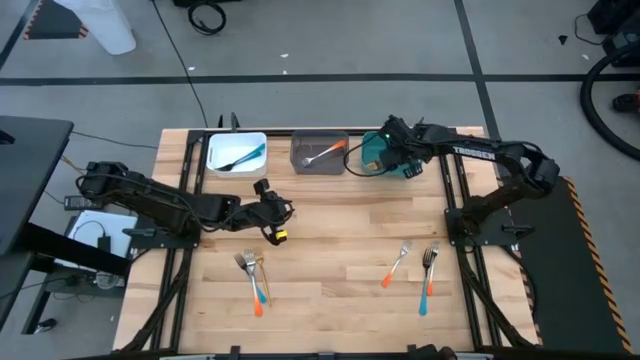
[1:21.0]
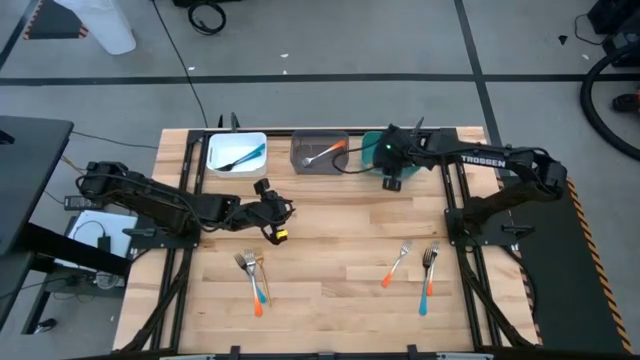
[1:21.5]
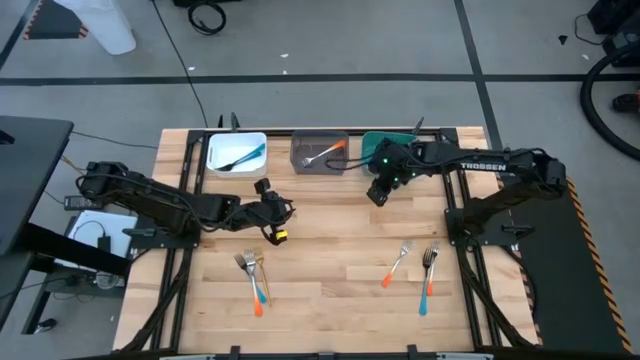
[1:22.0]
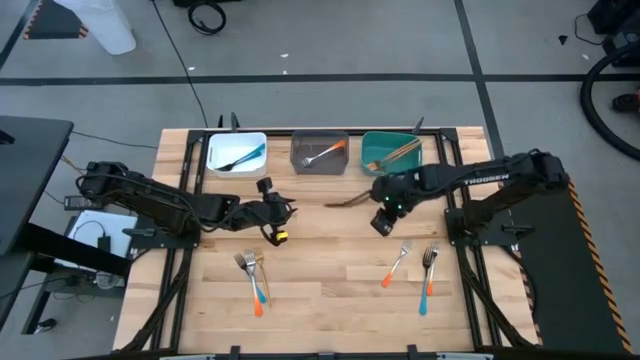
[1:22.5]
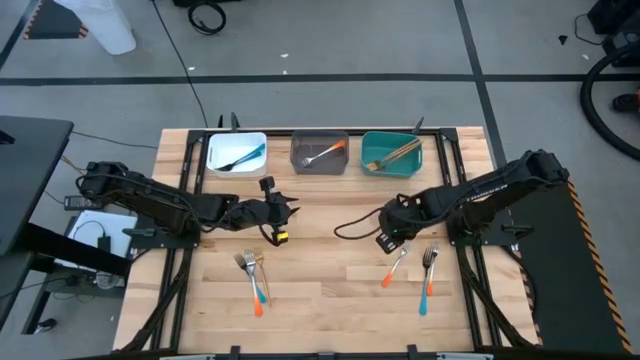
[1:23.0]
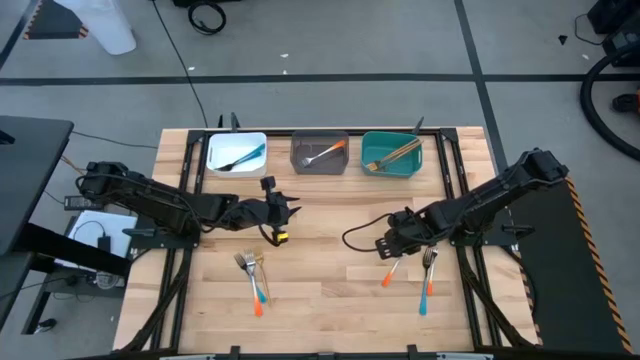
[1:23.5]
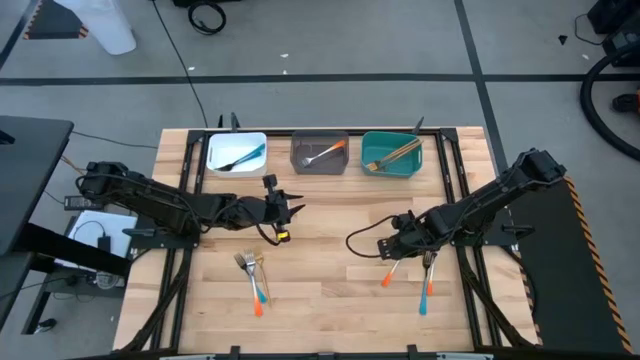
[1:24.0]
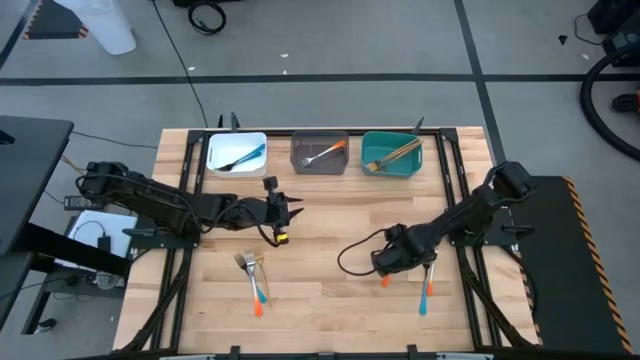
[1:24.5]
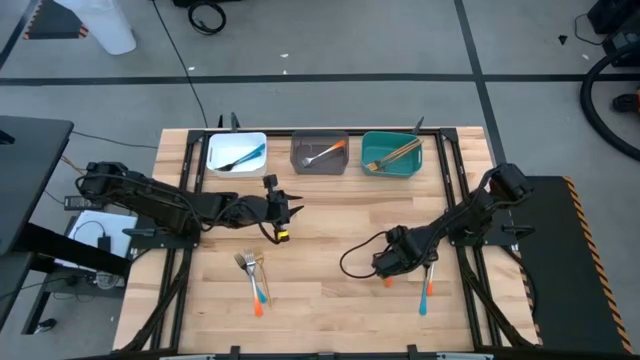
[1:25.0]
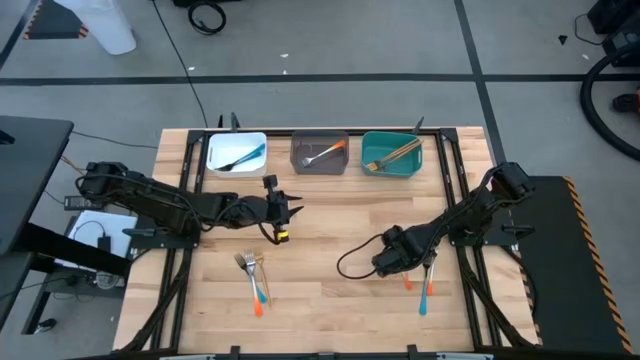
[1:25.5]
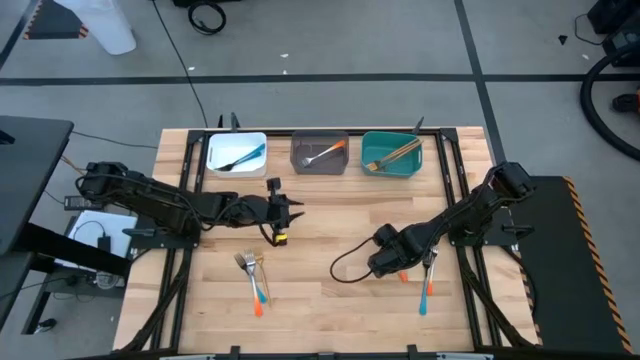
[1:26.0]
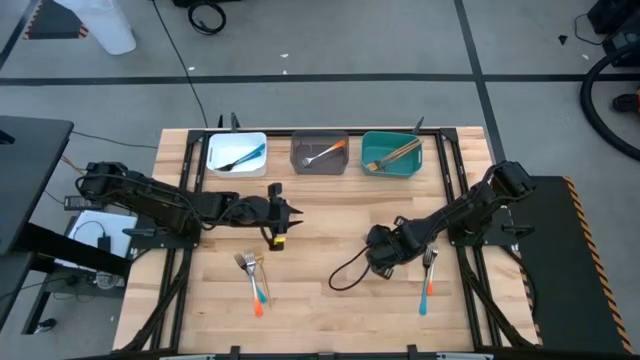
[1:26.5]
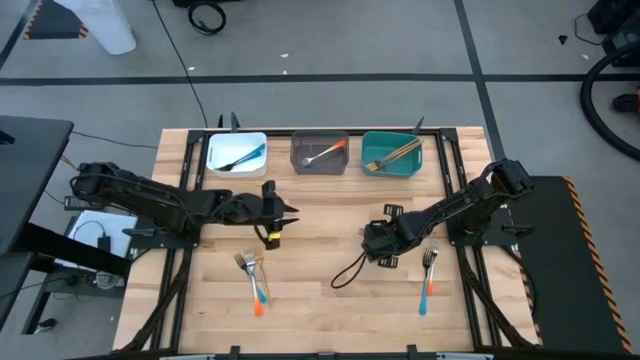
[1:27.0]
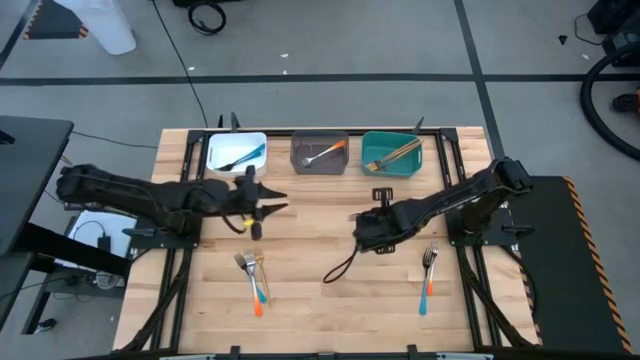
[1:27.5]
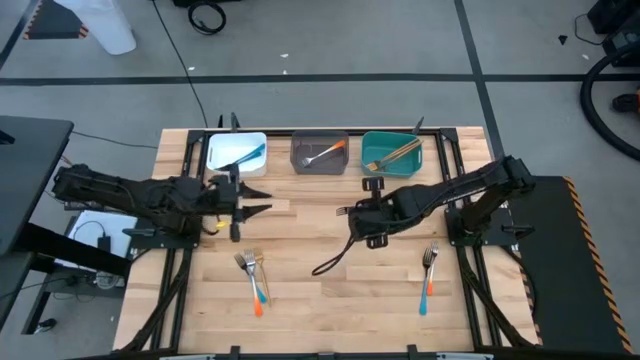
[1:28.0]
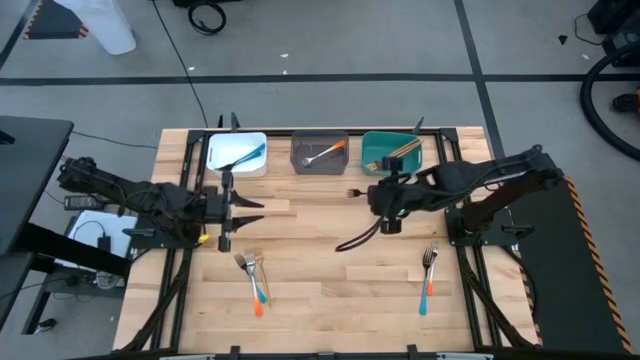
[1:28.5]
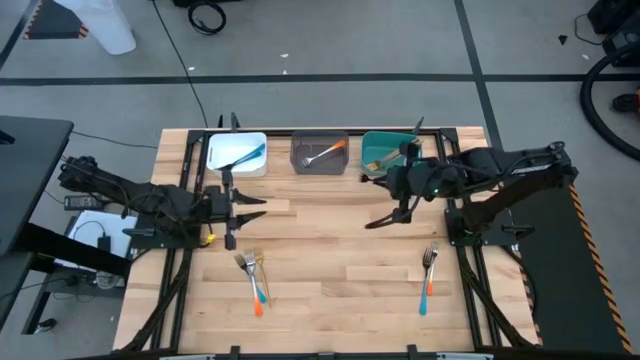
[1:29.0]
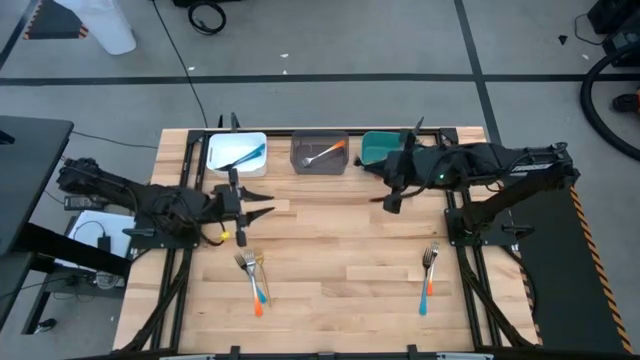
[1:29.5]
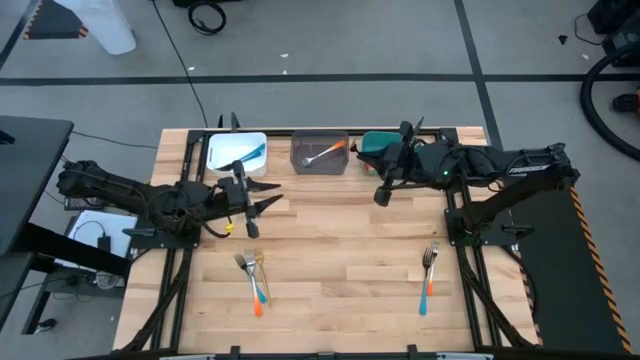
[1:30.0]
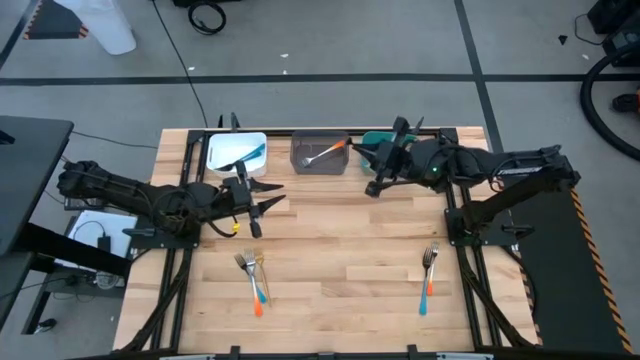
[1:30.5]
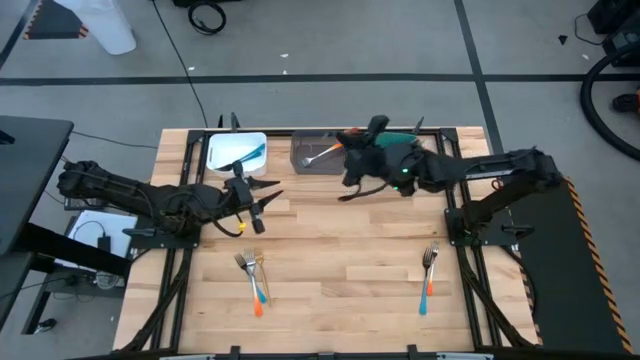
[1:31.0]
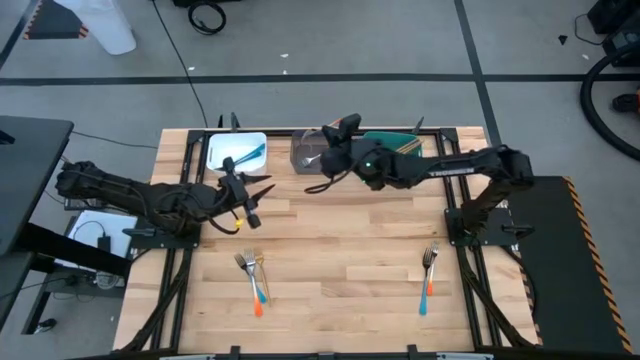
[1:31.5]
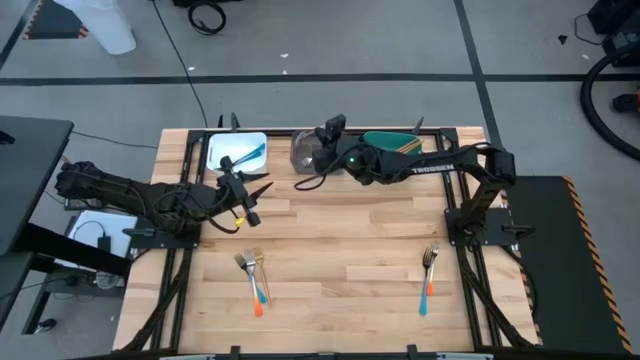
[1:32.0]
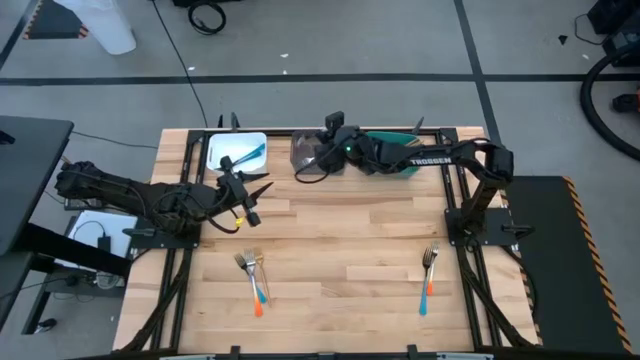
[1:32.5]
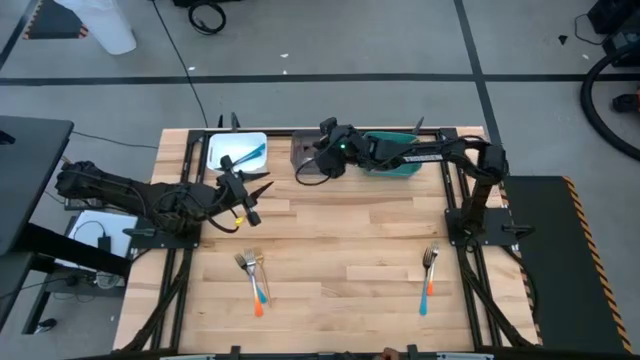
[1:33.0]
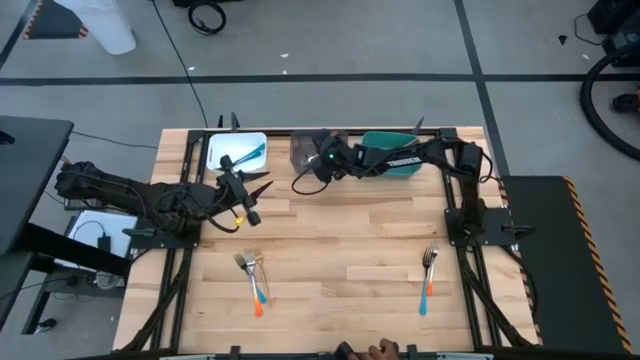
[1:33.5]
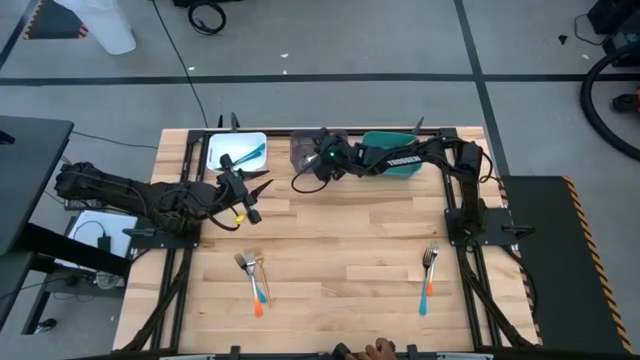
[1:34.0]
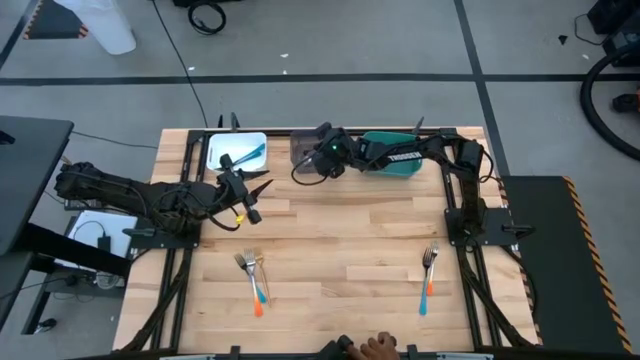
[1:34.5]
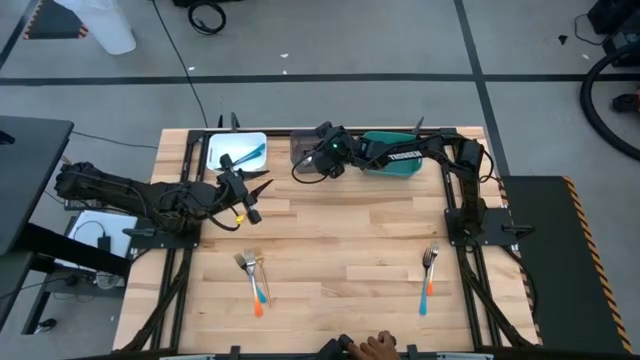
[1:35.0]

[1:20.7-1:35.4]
Task: Sort silverware by color (type)
Put the orange fork into the black bin

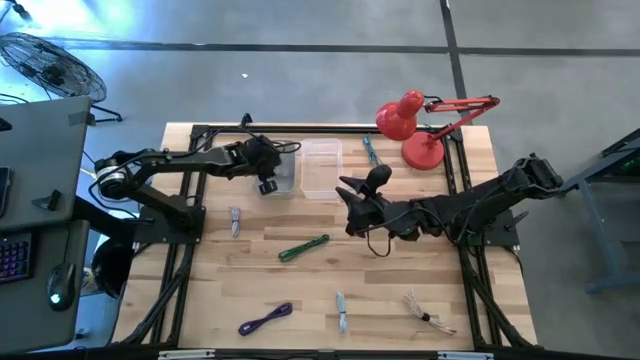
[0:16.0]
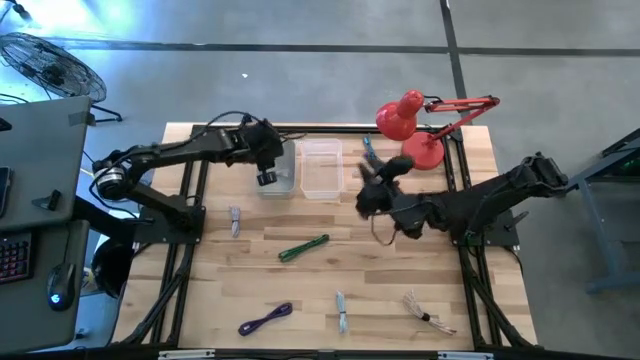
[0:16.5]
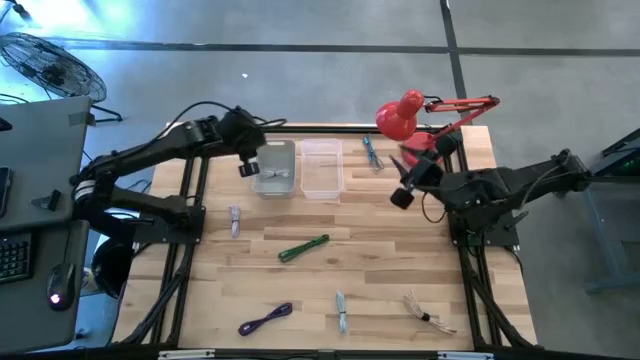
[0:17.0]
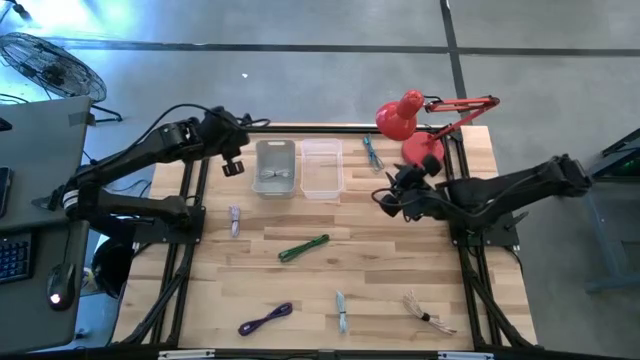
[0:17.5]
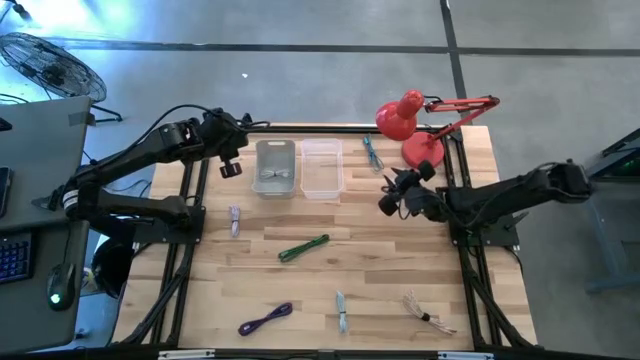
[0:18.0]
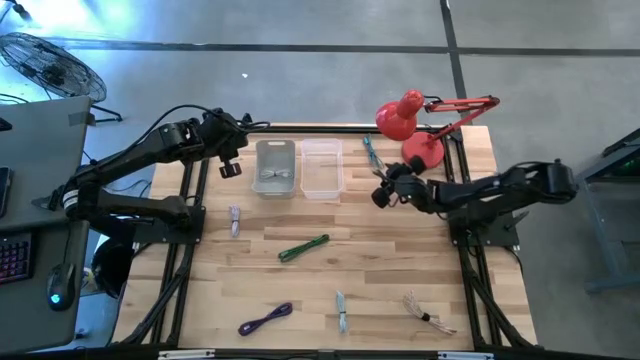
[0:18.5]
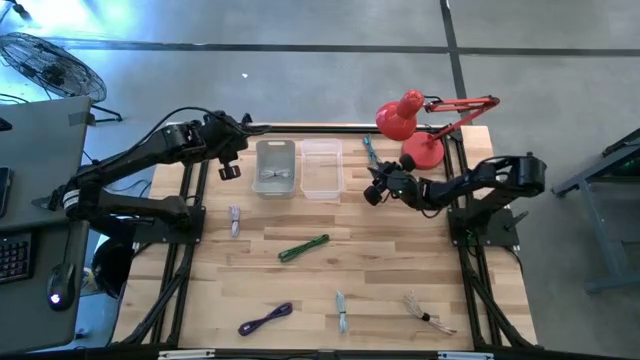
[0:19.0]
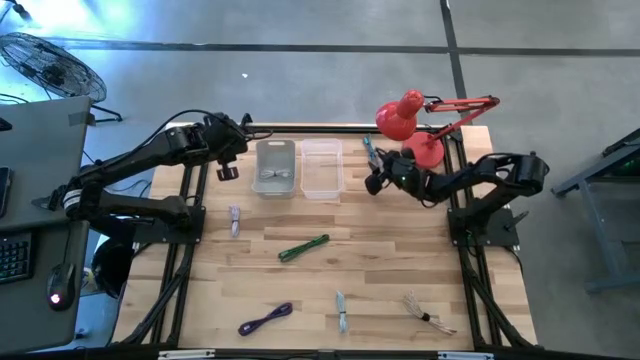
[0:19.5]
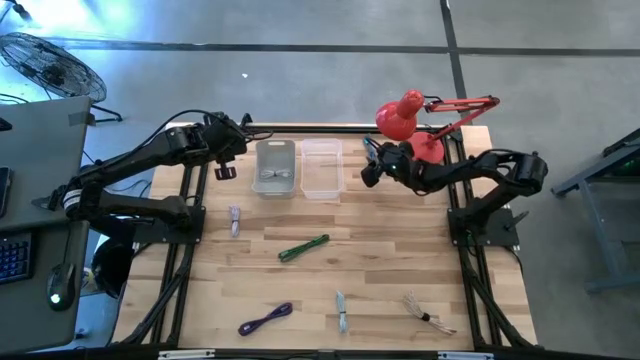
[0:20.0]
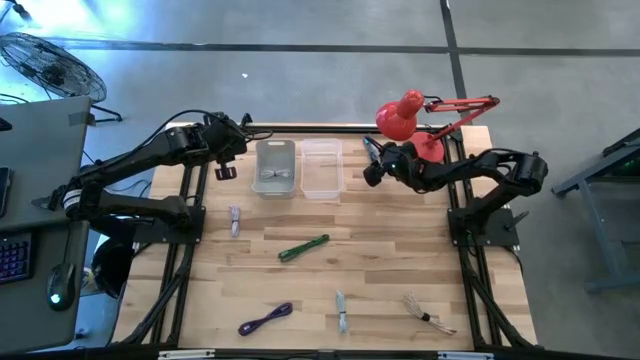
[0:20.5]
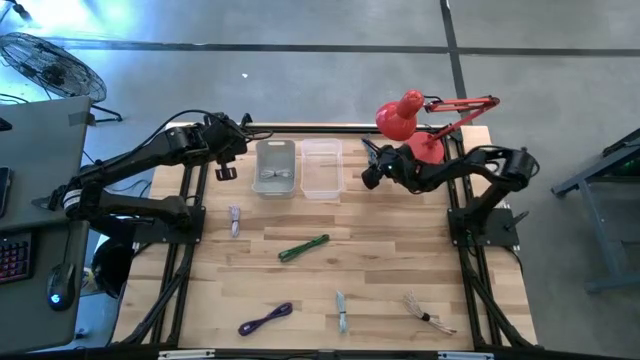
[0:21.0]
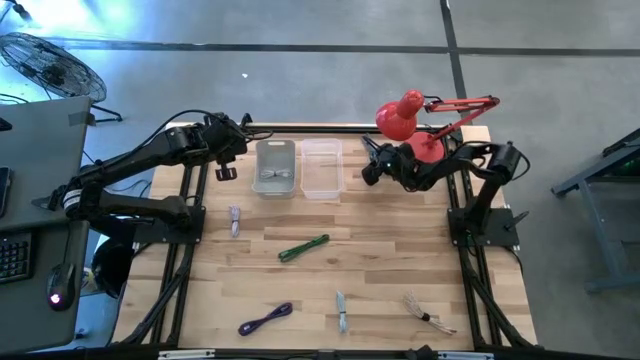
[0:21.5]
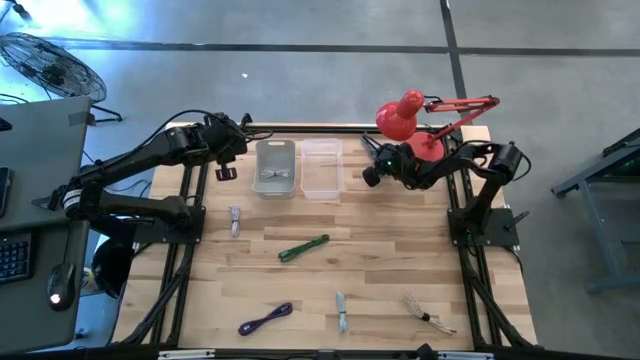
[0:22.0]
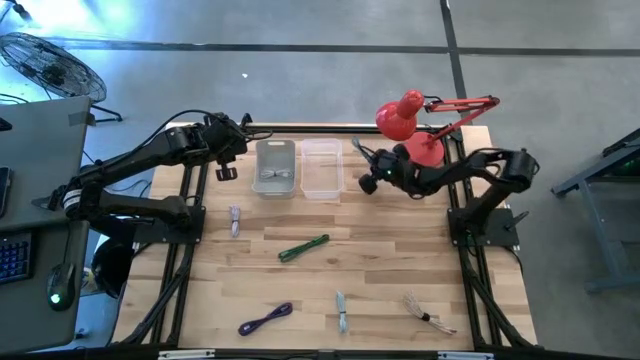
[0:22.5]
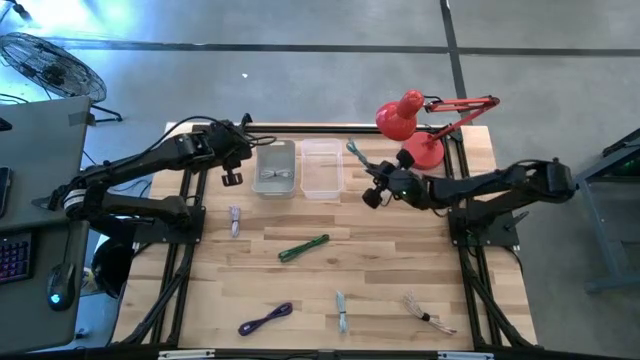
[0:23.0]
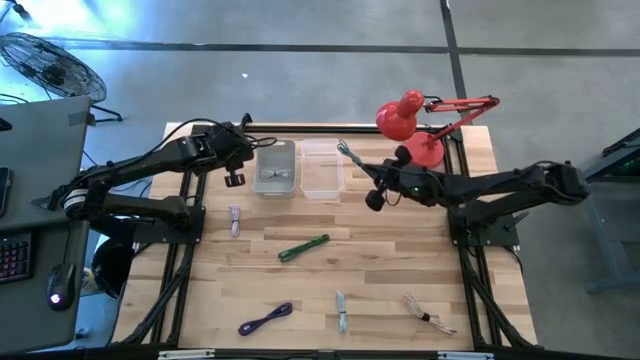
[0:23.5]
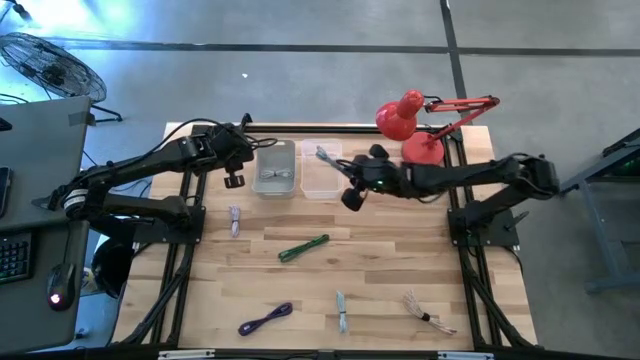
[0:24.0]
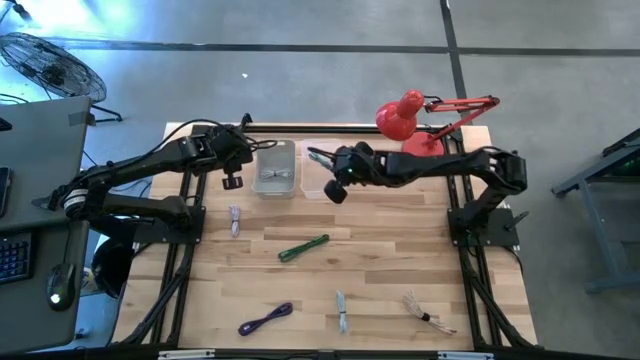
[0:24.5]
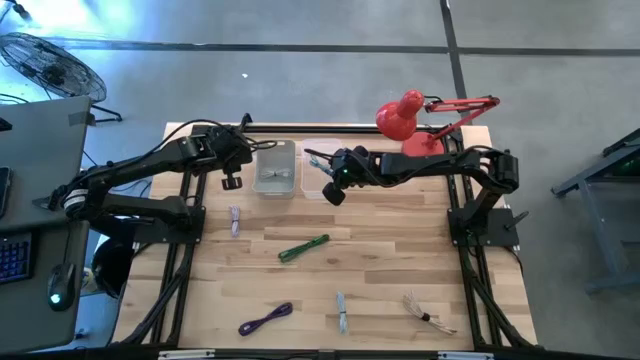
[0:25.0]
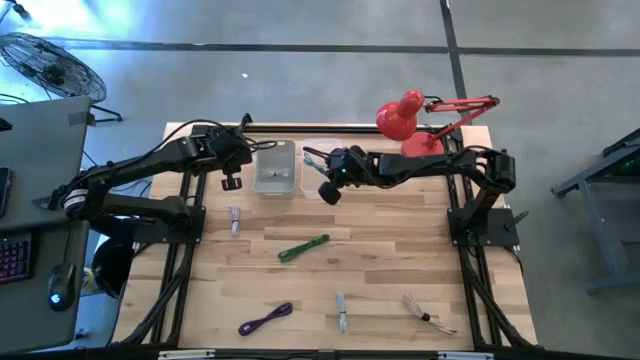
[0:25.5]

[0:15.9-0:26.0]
Task: Pick & Place USB Port
Put the blue patterned charger cable into the white bin
